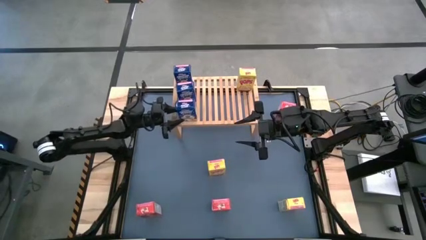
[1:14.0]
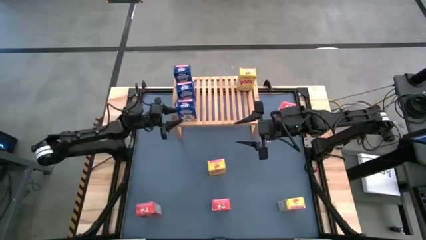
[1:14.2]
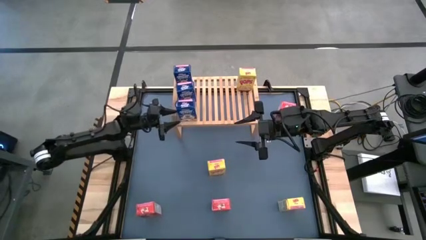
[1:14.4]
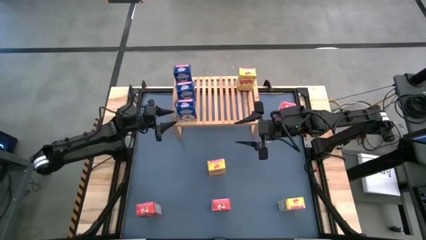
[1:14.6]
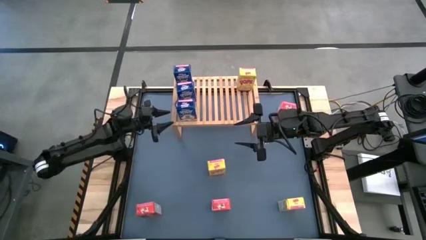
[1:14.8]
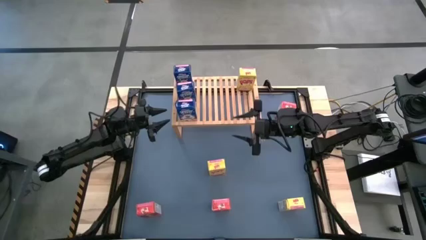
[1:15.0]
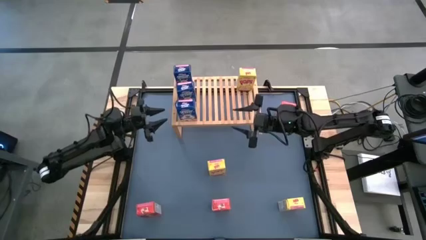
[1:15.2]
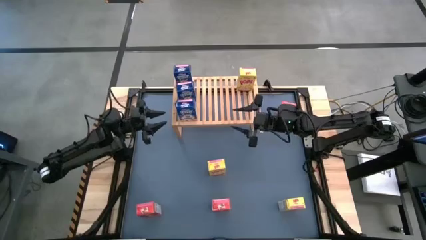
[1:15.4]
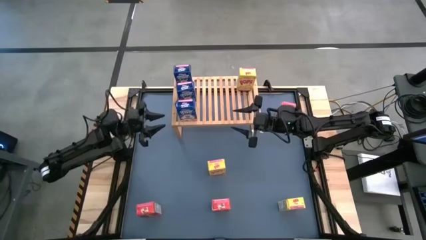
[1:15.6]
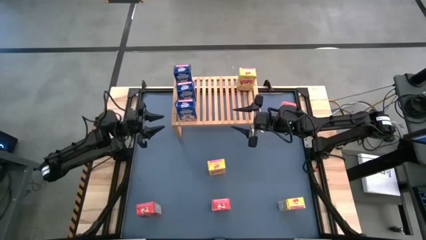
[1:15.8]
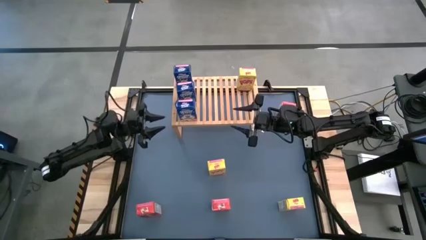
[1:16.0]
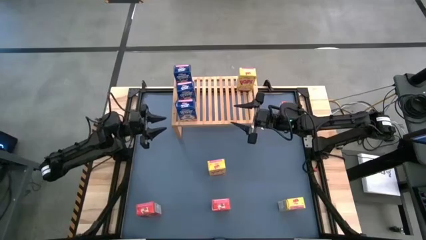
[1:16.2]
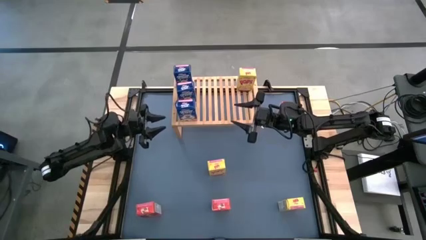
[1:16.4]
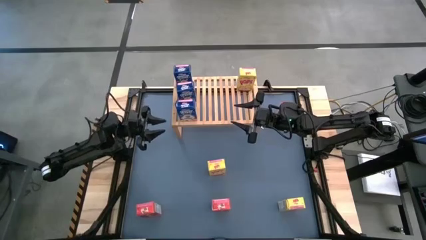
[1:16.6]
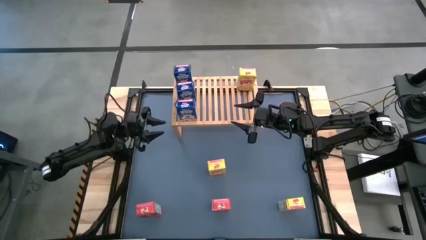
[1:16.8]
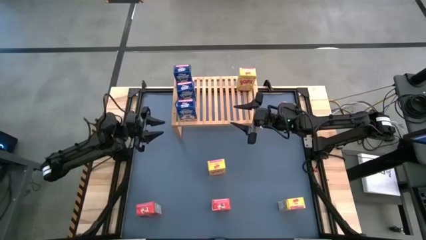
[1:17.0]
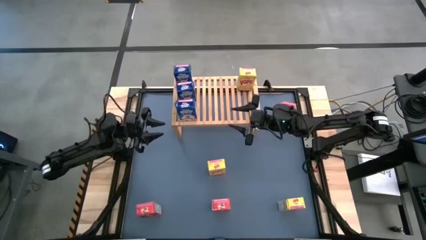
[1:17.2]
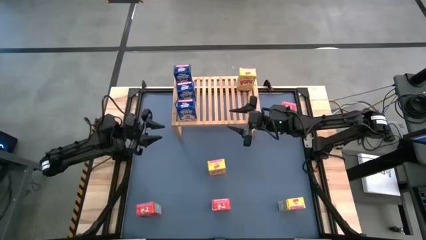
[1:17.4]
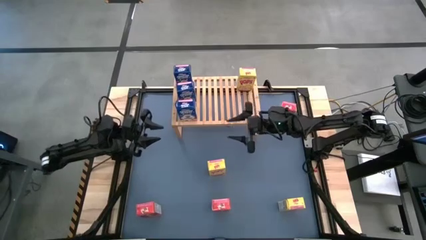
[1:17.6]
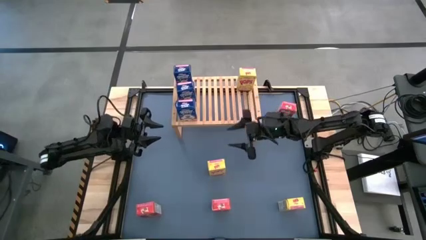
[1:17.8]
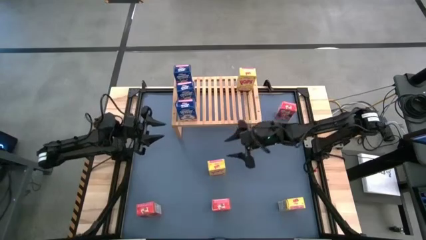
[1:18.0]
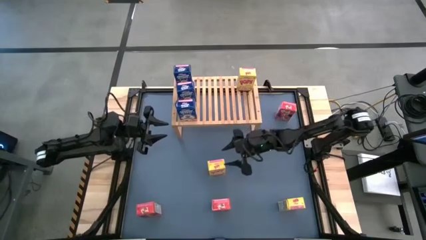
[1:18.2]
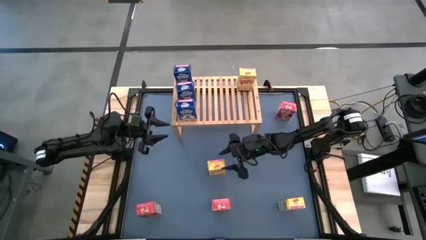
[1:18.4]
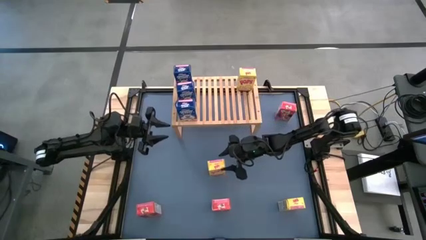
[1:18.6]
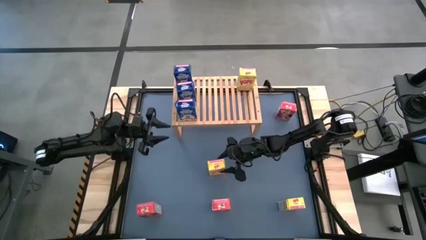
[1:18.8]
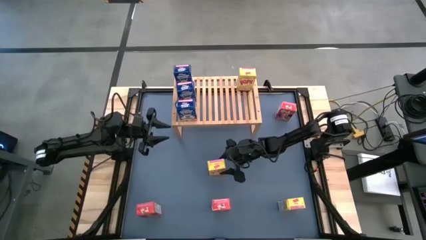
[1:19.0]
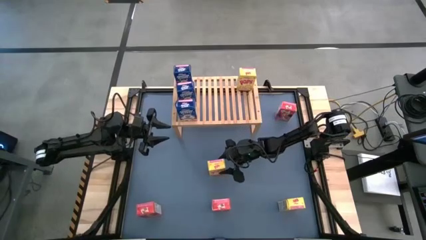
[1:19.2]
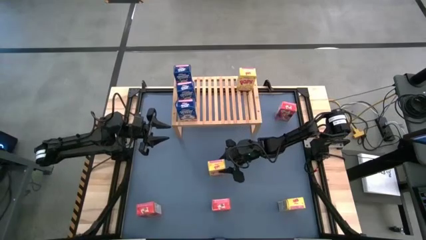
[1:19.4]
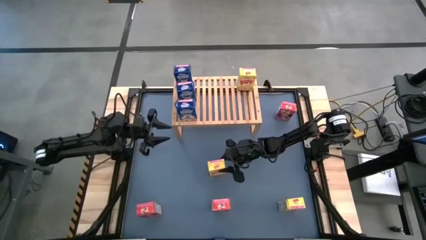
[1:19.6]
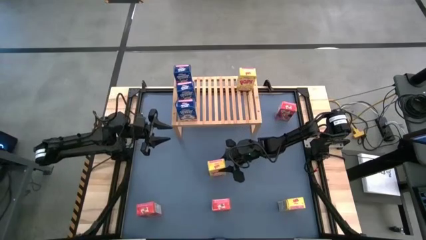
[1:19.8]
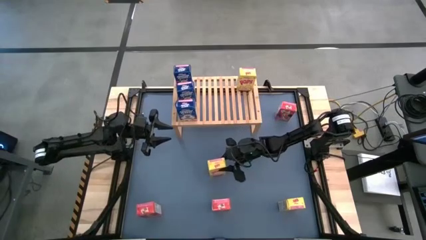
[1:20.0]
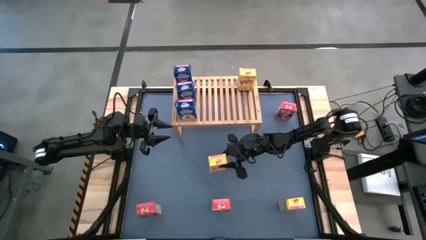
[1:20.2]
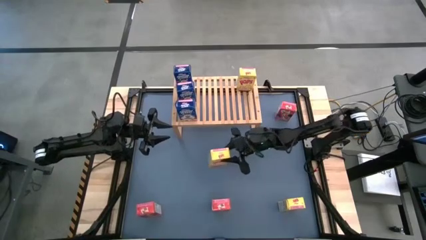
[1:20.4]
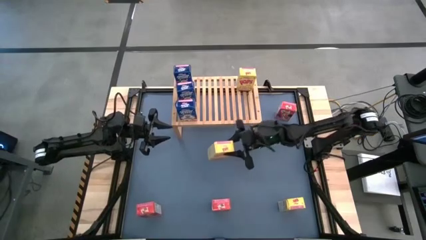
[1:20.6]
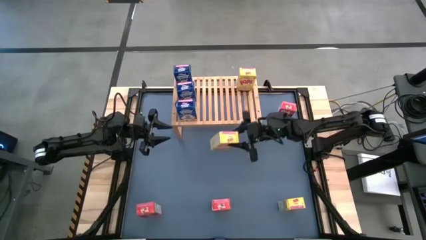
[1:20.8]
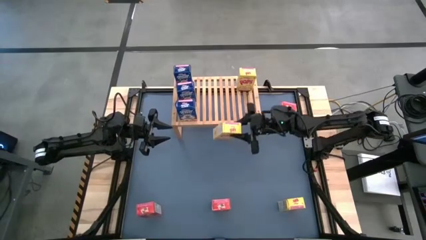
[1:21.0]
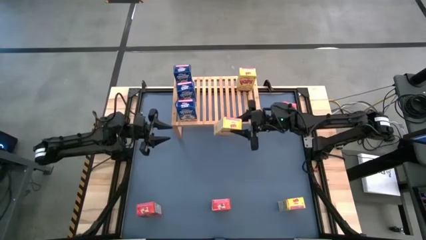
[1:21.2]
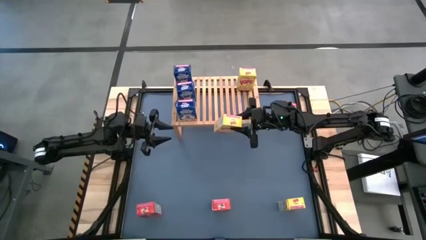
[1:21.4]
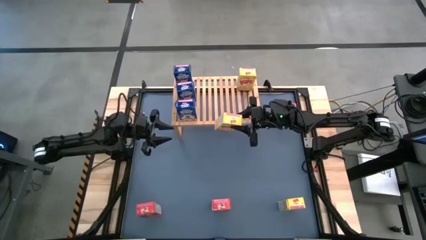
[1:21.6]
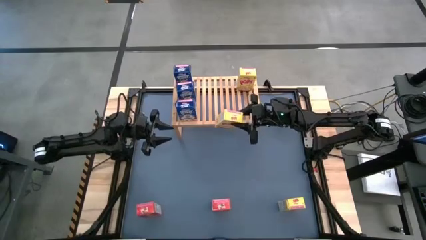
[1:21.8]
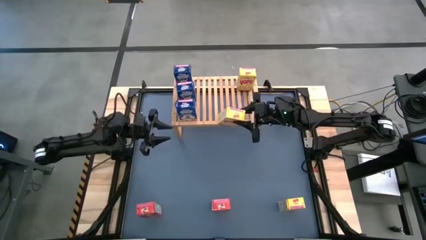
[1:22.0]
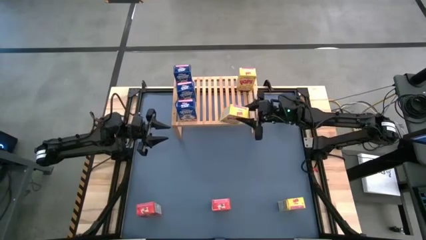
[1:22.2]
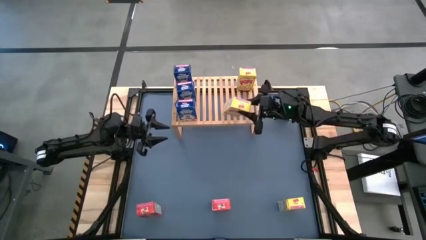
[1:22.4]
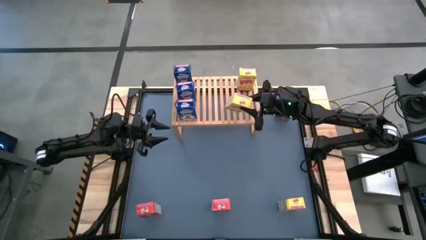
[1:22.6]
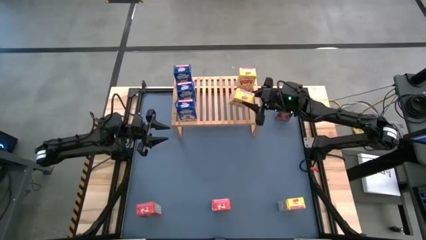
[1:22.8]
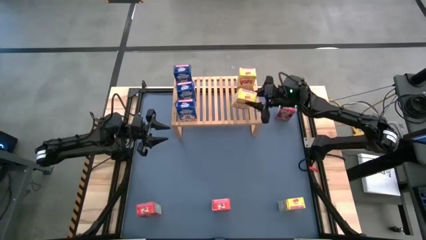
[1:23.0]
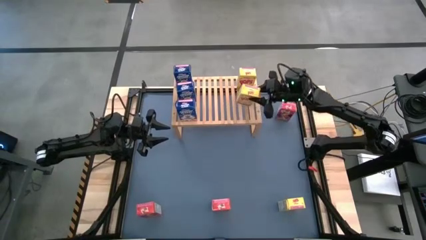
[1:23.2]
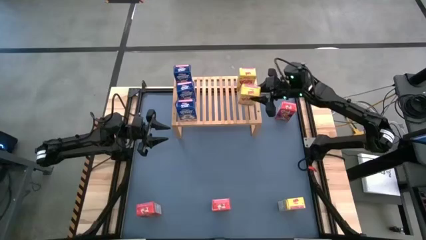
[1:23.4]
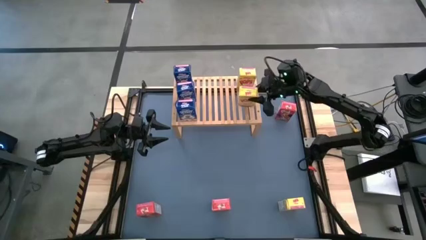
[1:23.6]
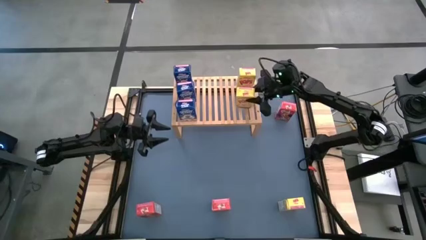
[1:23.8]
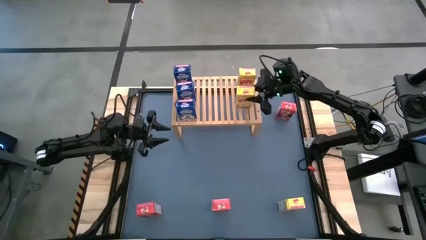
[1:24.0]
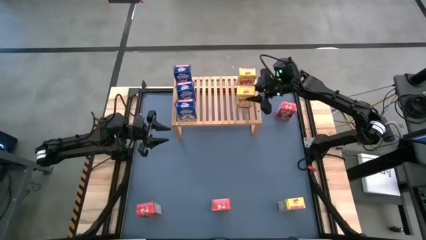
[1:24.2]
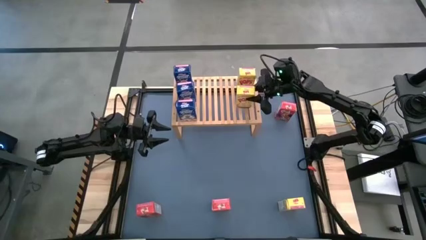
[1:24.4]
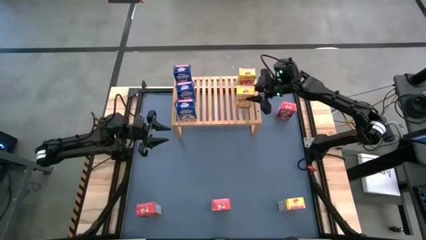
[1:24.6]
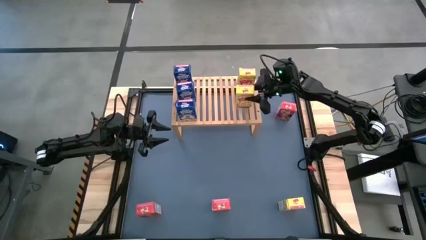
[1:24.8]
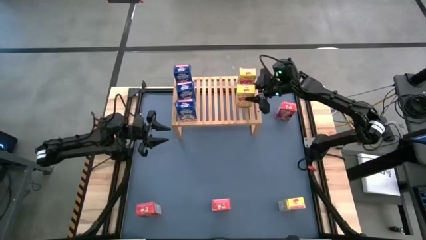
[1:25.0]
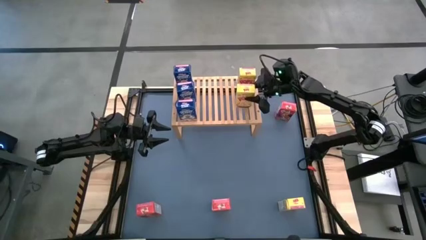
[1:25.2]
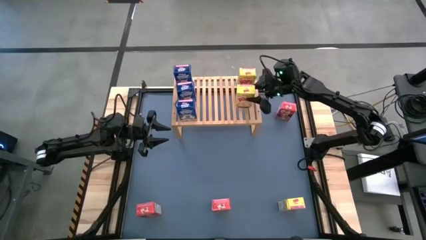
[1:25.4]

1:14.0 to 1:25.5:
Task: Stack cereal on shelf
Put the top yellow cereal box on the shelf aligned with the other yellow cereal box

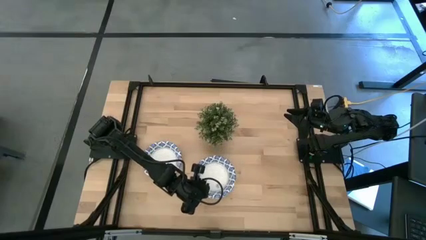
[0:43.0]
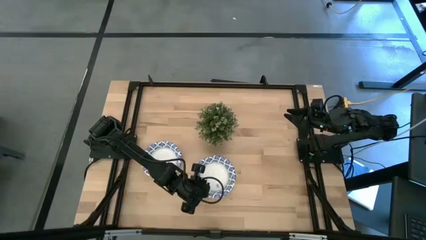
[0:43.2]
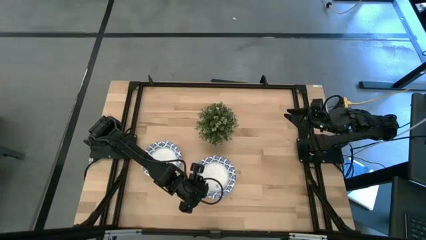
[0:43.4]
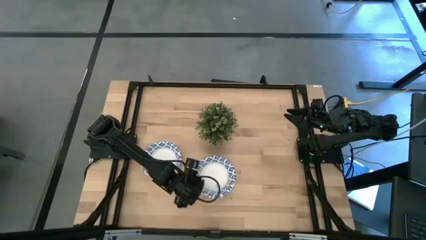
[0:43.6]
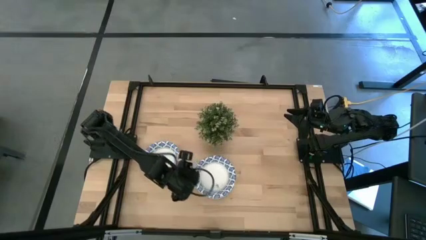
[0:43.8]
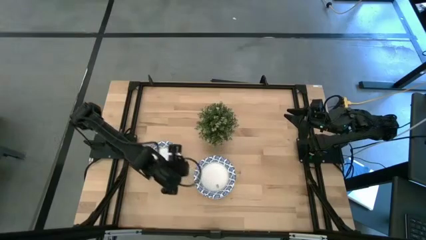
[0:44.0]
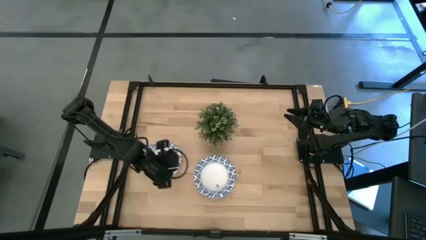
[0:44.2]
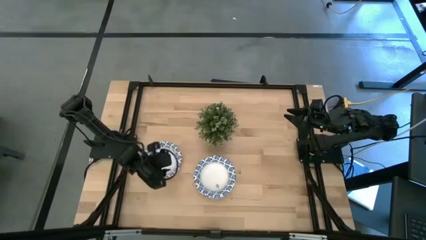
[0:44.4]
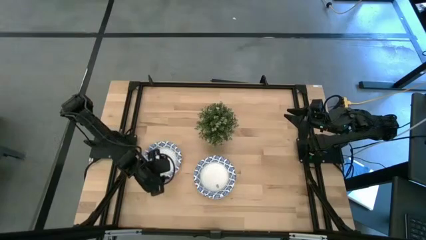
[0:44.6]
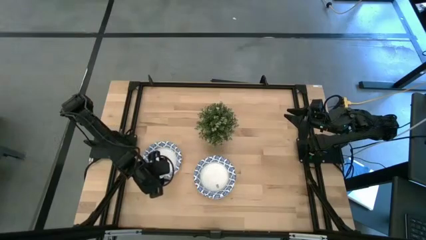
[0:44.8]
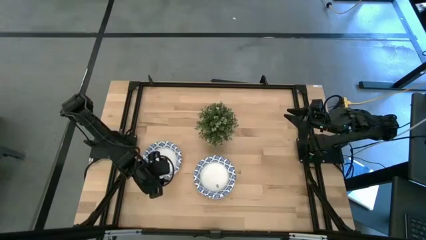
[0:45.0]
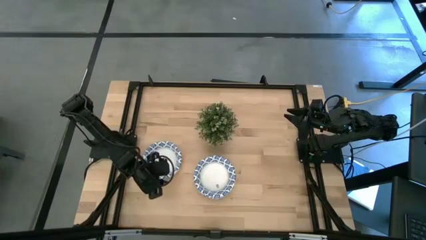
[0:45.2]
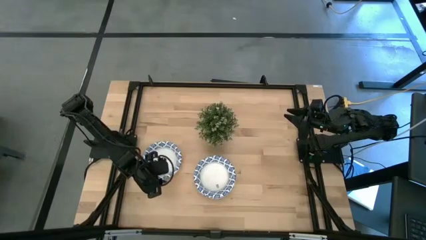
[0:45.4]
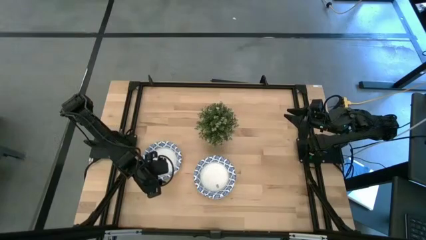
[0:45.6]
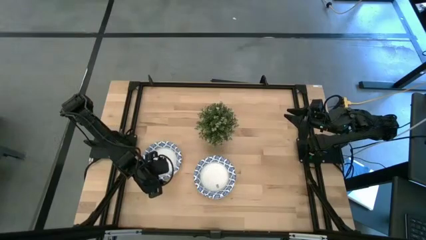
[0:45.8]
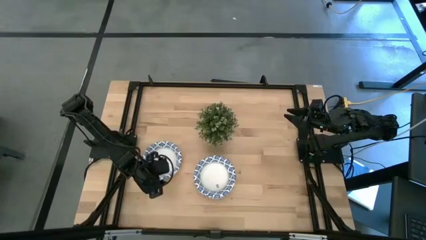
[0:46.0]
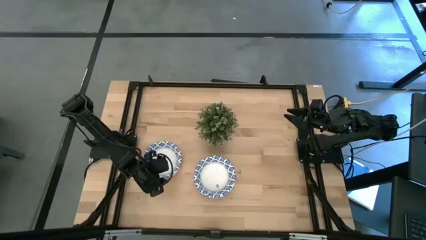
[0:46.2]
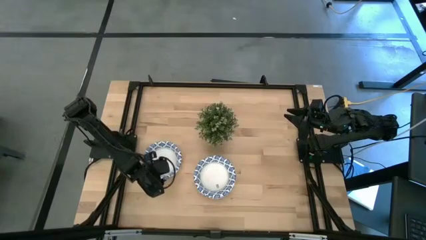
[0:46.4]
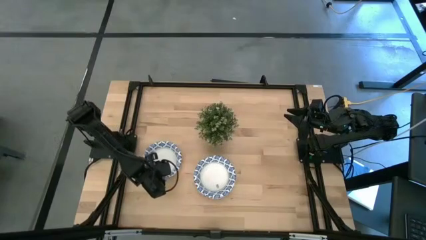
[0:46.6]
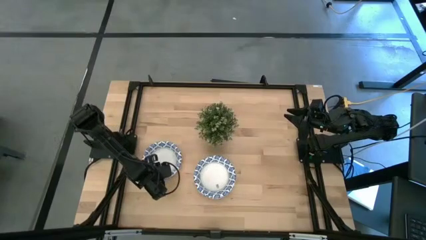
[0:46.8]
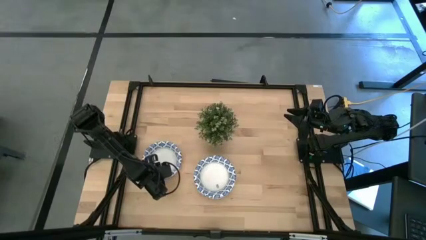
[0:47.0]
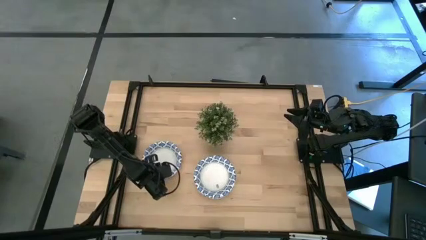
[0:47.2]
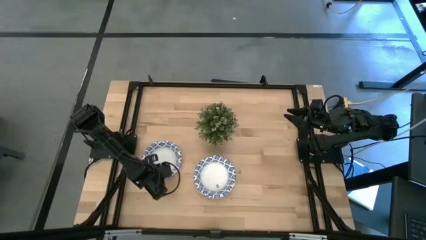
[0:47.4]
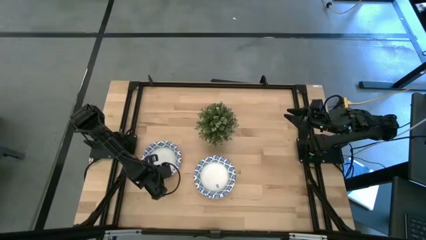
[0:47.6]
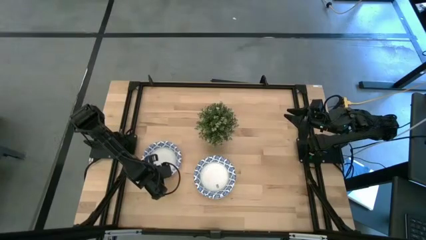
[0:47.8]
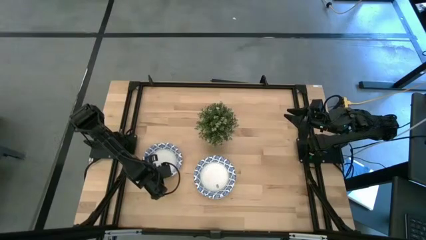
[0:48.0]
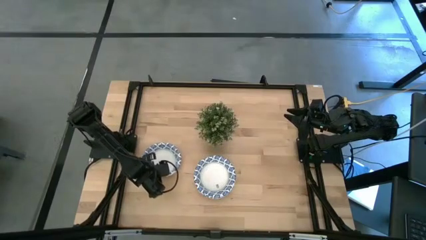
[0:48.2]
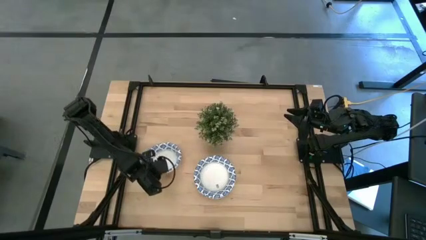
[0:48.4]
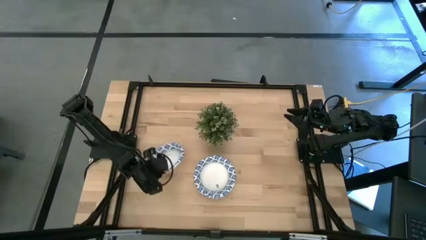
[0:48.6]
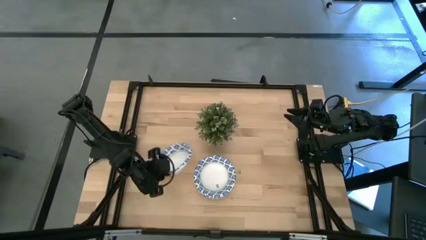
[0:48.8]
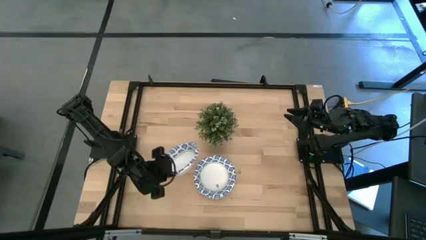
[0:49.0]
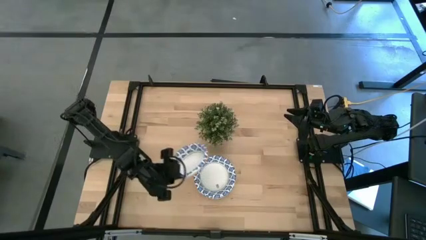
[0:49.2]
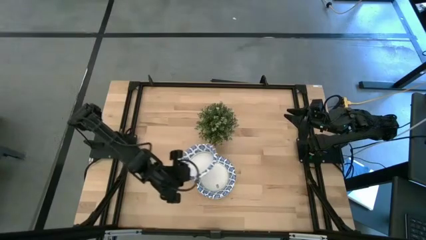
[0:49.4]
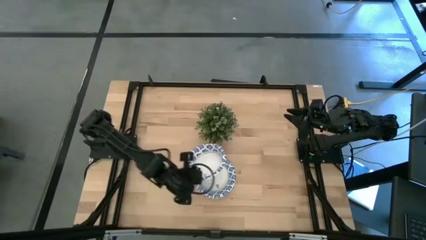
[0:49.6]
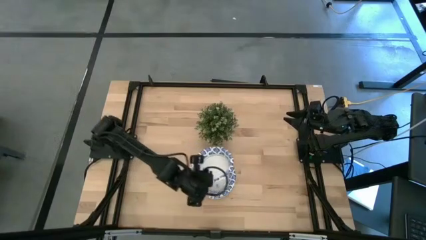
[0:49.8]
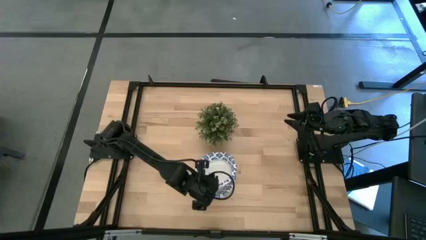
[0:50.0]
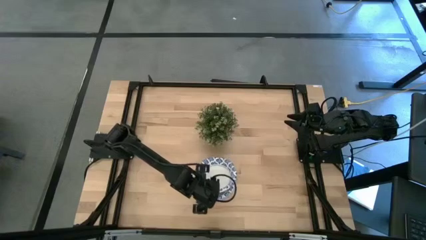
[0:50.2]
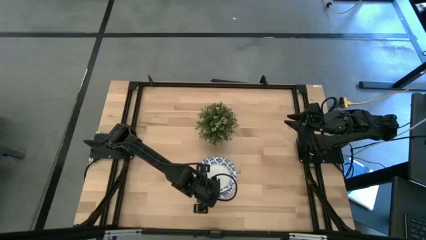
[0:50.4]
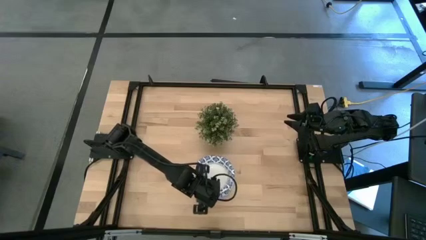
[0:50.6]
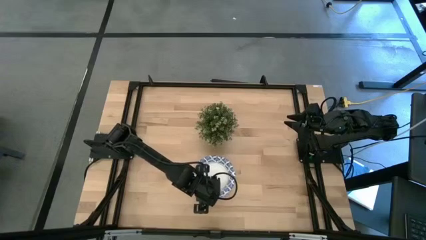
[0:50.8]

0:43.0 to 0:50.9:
Task: Nest bowls inside each other
Stack the white bowl on top of the other white bowl
